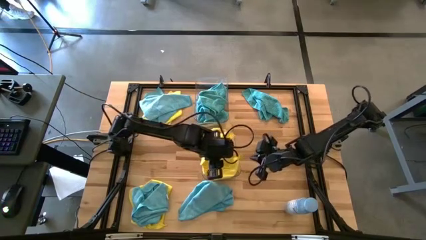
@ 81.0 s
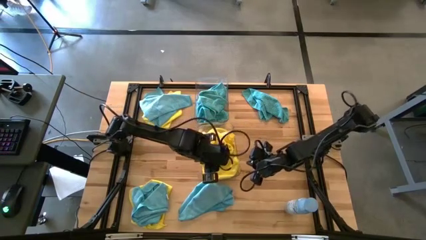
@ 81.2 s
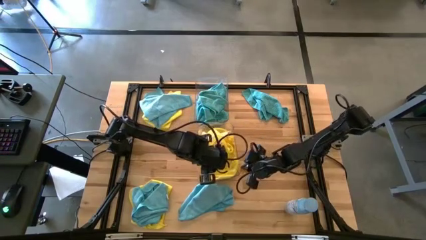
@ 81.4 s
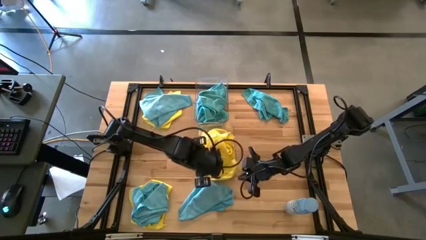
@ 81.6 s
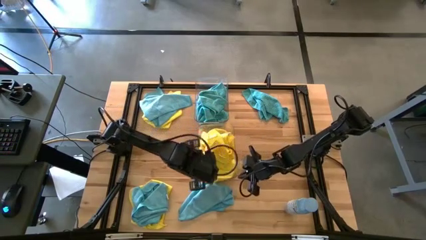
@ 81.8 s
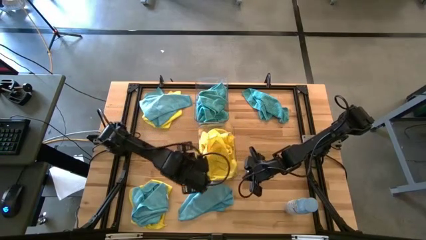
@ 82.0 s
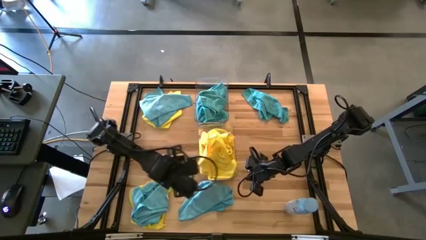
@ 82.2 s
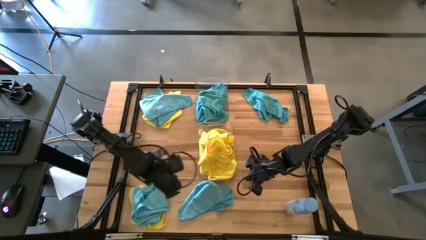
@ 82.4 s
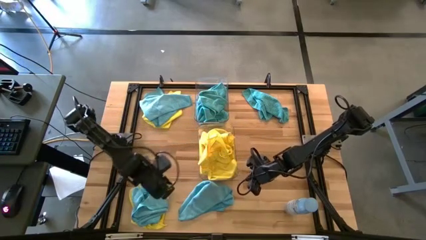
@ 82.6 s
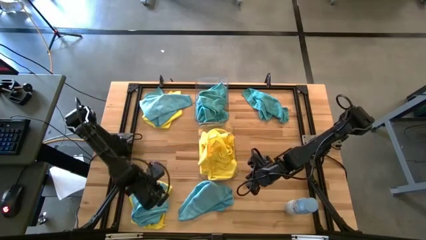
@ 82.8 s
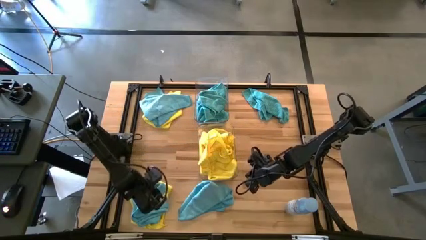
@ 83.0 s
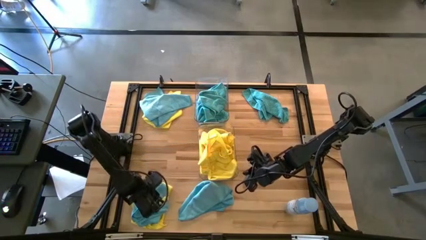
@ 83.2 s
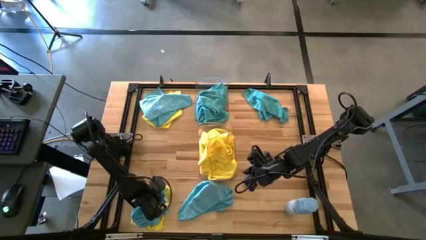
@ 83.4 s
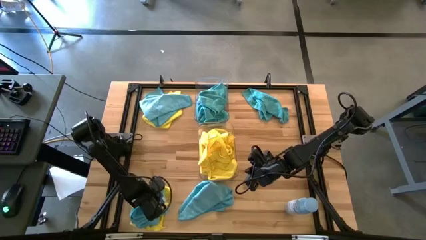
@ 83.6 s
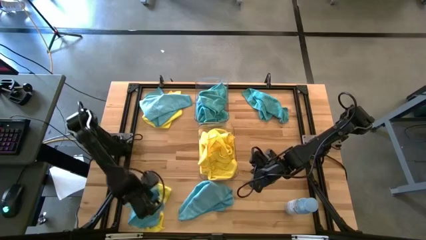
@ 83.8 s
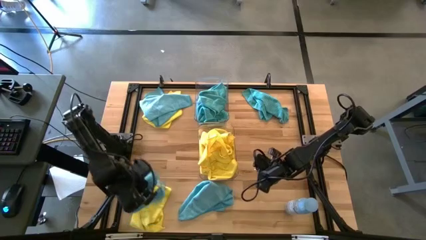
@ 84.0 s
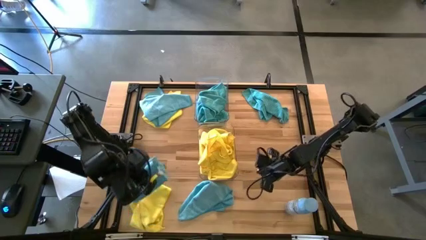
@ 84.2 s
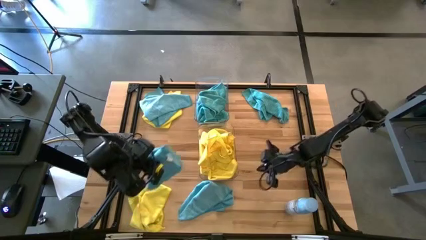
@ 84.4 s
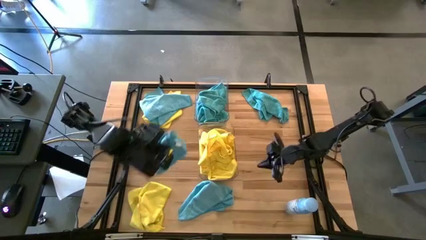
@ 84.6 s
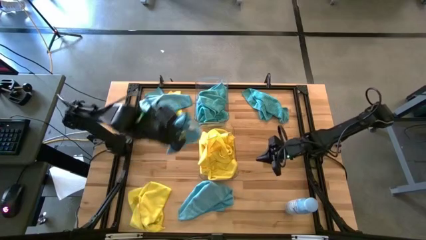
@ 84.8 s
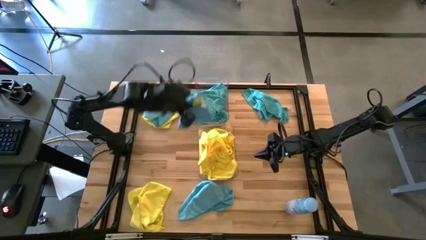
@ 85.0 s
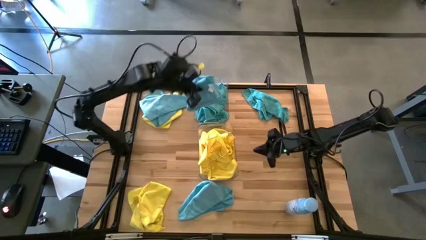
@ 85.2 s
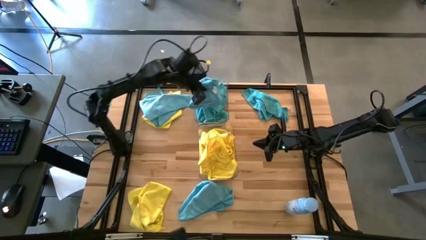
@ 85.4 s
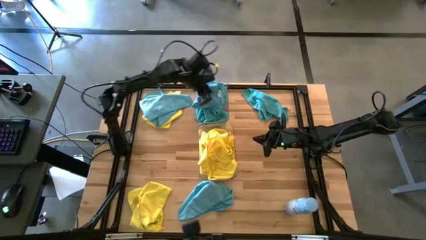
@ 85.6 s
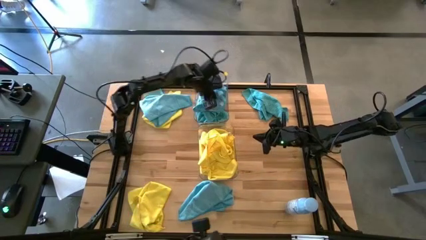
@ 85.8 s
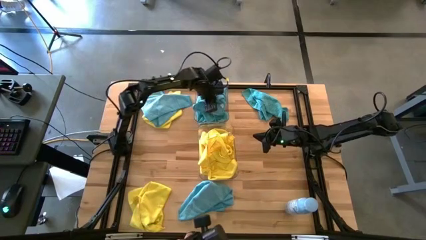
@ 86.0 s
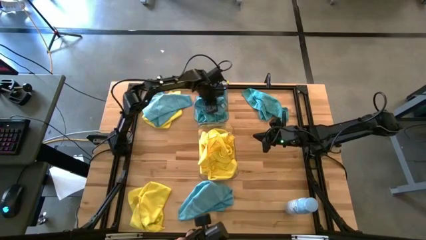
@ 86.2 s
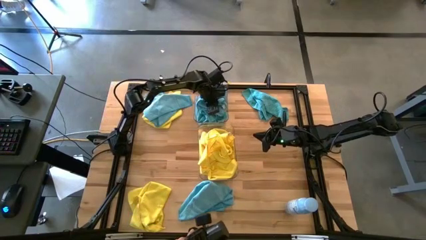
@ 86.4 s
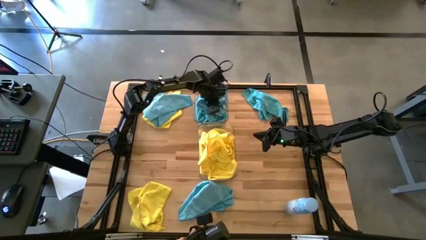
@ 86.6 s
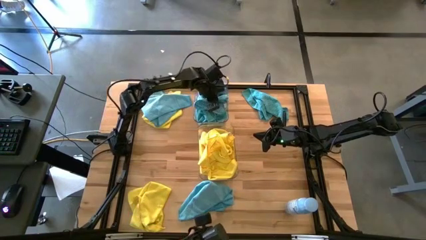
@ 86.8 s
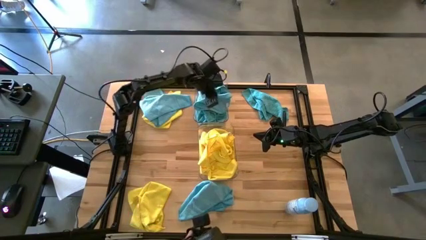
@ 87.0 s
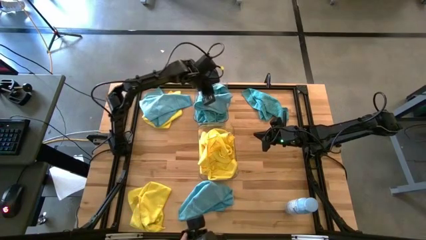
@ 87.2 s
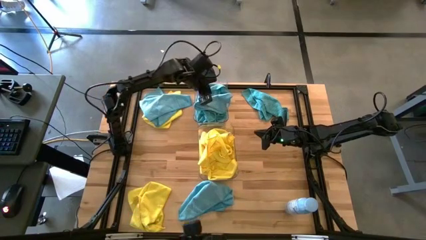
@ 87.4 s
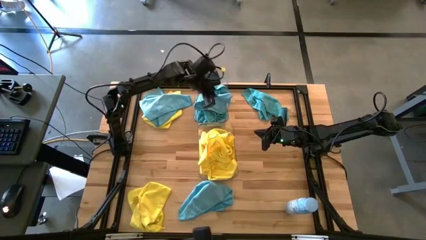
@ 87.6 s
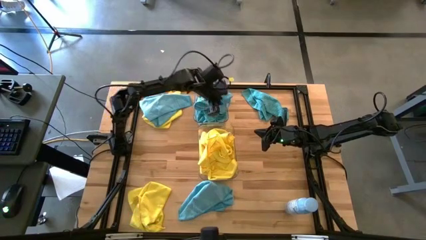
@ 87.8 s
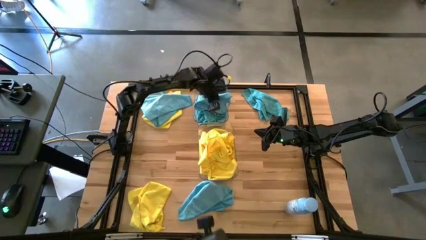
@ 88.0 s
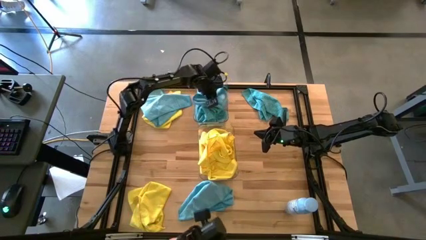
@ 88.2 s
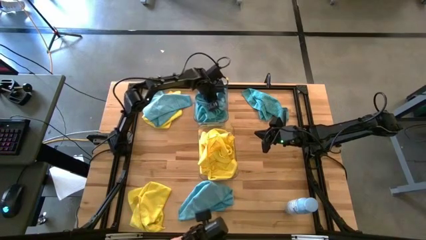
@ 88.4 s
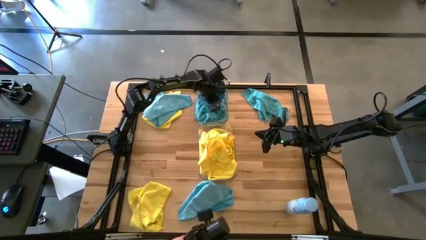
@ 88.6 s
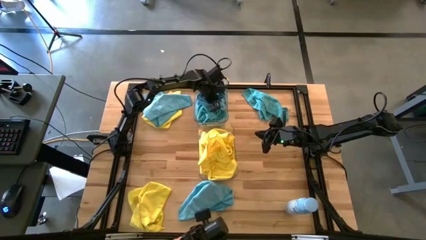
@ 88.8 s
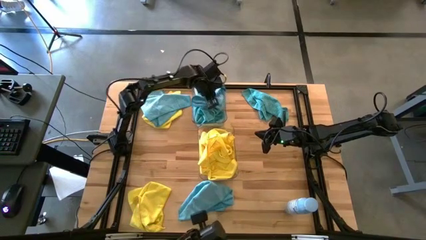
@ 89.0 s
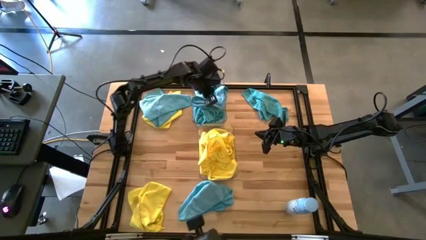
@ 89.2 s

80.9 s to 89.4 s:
Task: Sort microfiber towel by color & place in baskets
Put the blue towel into the top transparent bin

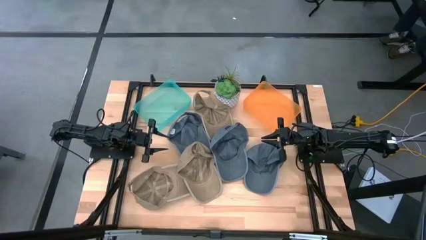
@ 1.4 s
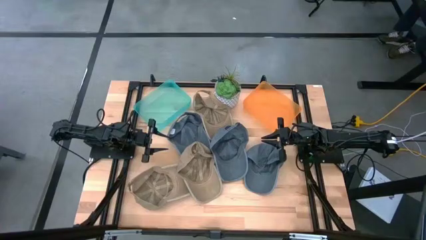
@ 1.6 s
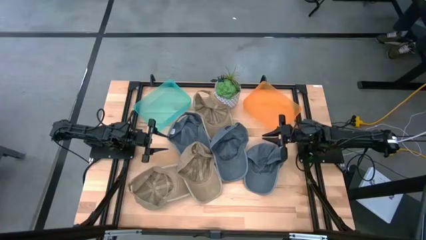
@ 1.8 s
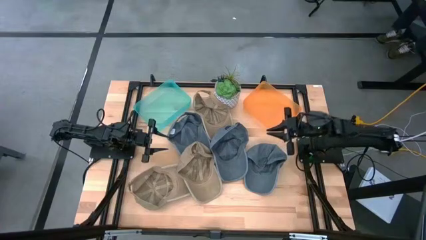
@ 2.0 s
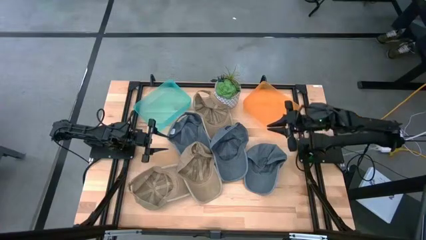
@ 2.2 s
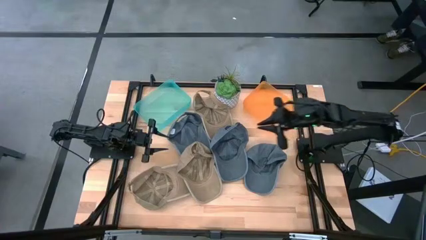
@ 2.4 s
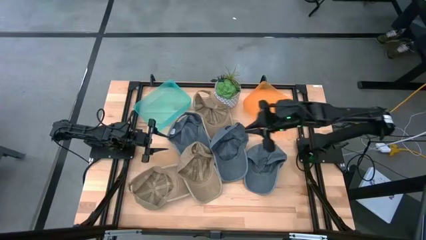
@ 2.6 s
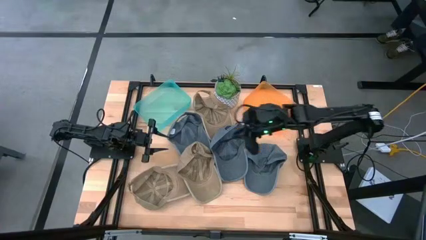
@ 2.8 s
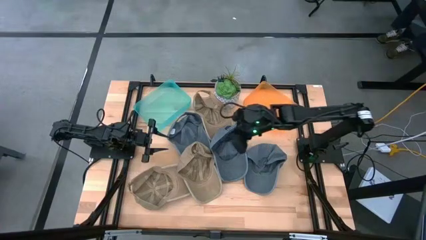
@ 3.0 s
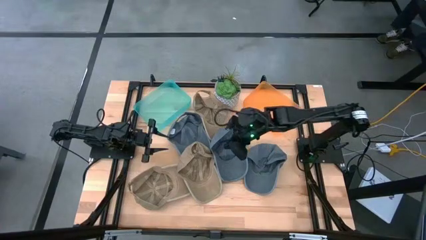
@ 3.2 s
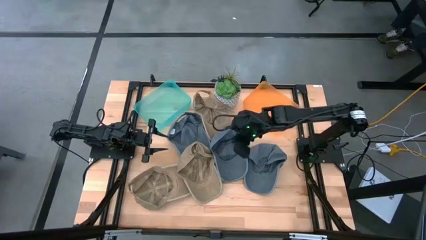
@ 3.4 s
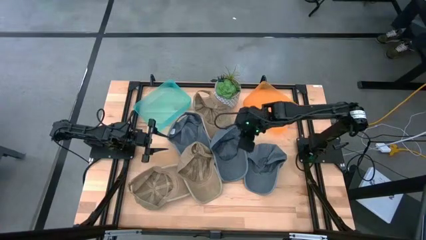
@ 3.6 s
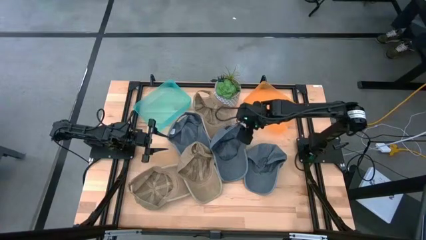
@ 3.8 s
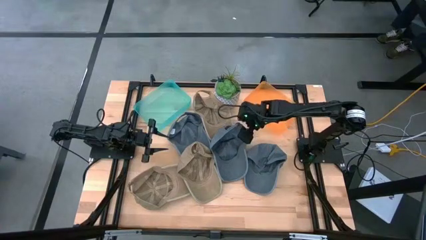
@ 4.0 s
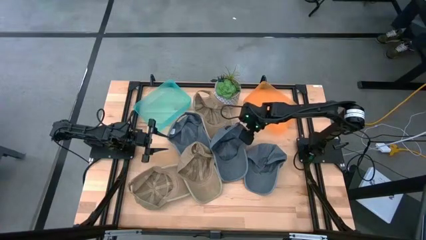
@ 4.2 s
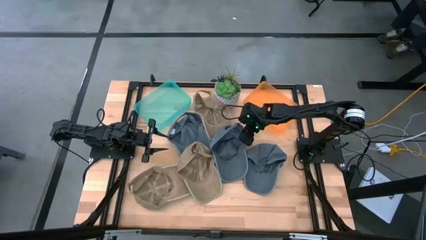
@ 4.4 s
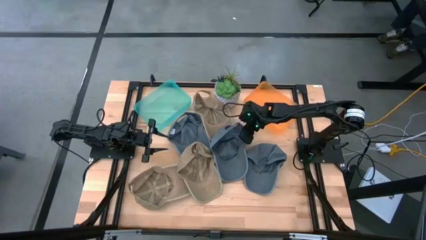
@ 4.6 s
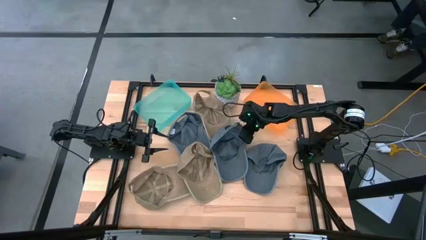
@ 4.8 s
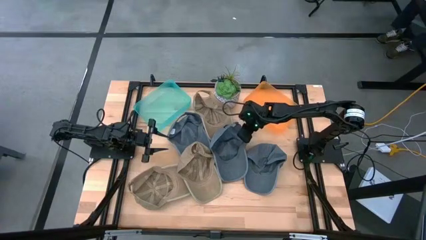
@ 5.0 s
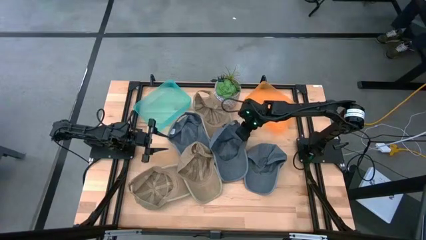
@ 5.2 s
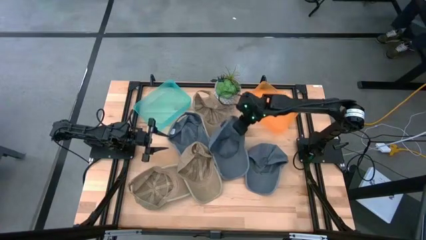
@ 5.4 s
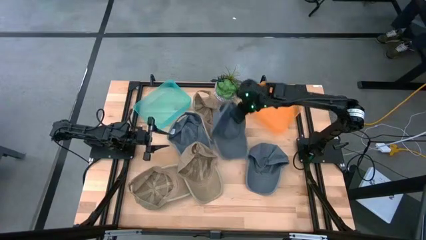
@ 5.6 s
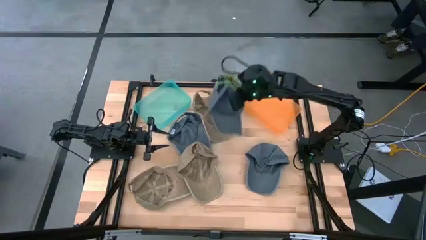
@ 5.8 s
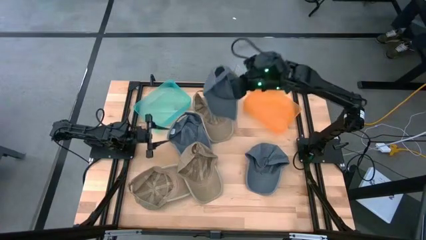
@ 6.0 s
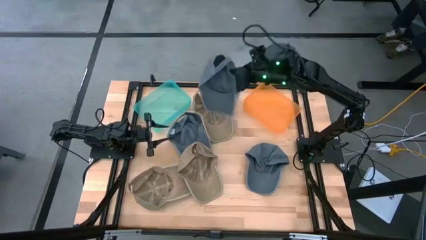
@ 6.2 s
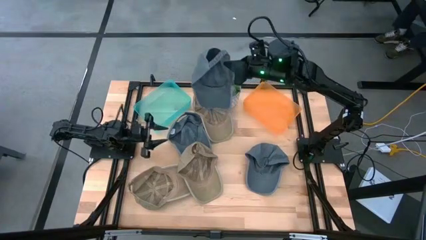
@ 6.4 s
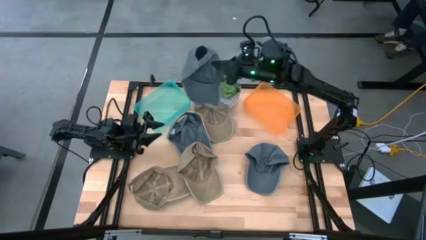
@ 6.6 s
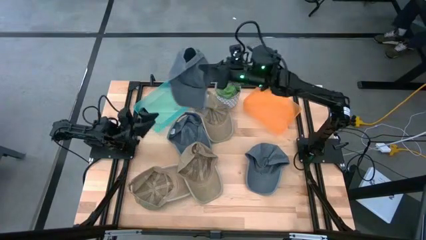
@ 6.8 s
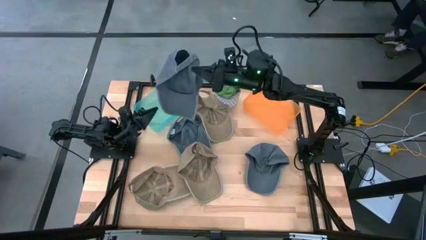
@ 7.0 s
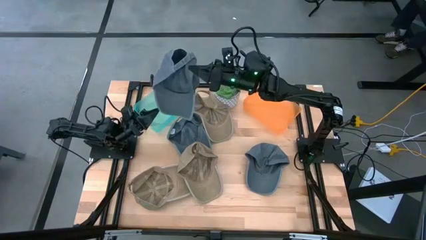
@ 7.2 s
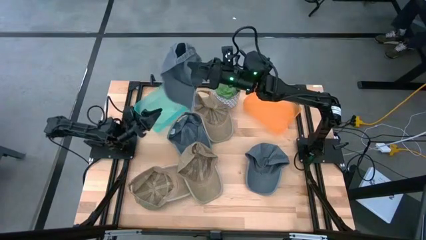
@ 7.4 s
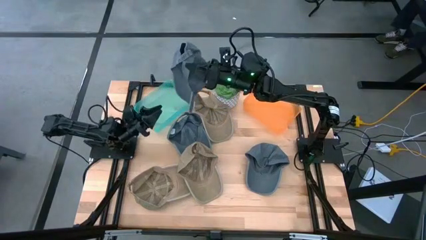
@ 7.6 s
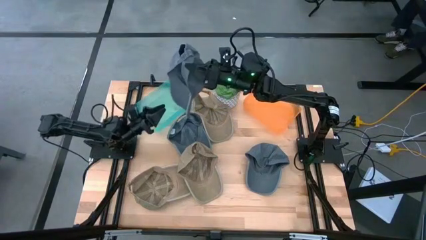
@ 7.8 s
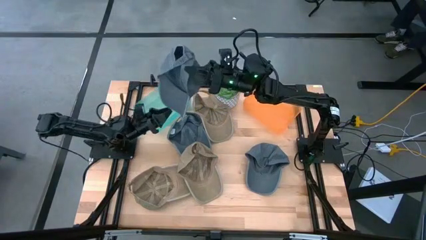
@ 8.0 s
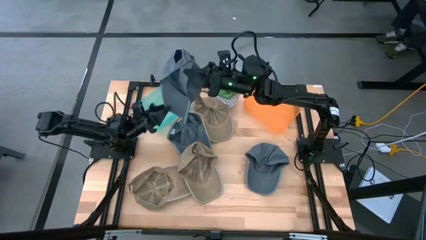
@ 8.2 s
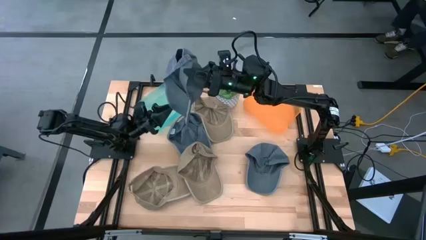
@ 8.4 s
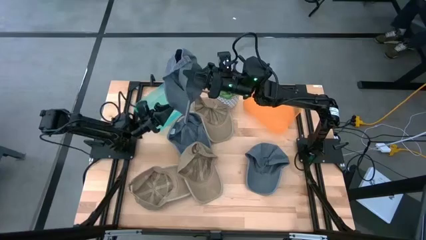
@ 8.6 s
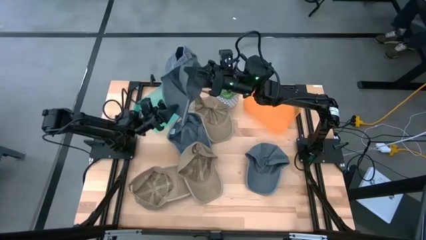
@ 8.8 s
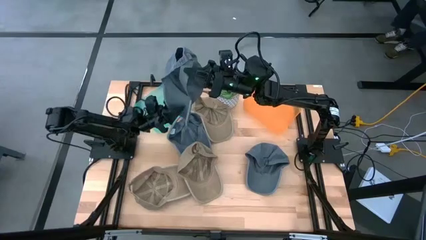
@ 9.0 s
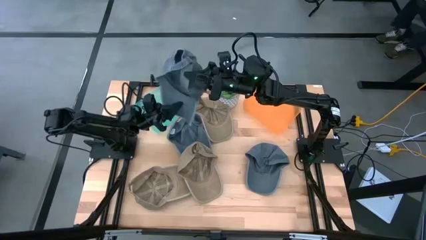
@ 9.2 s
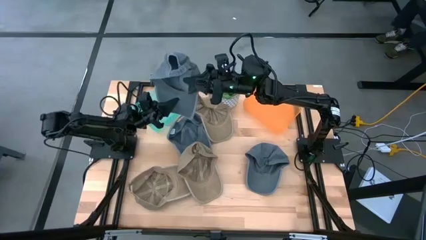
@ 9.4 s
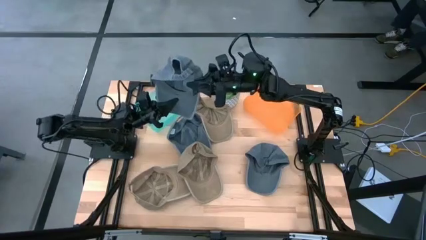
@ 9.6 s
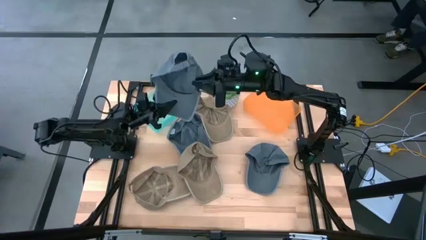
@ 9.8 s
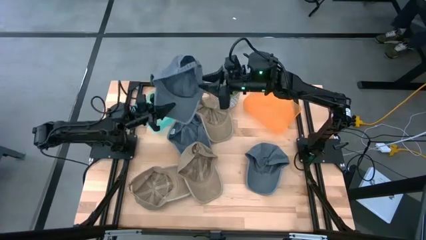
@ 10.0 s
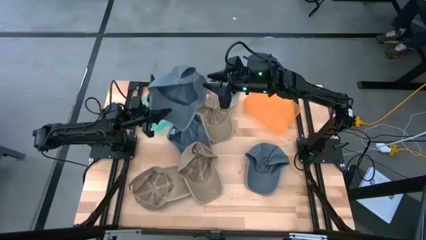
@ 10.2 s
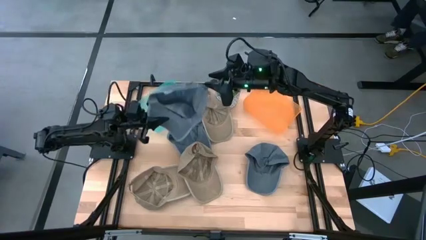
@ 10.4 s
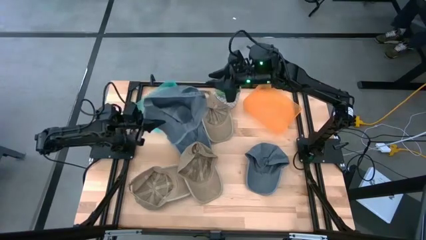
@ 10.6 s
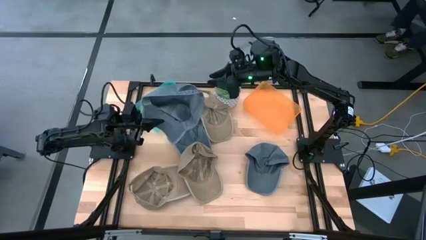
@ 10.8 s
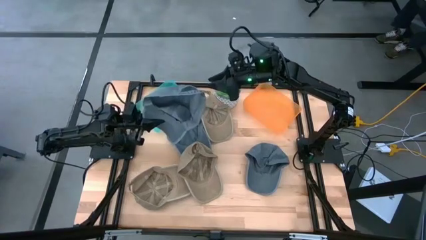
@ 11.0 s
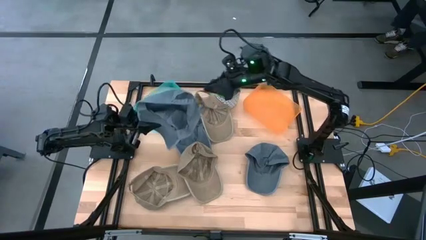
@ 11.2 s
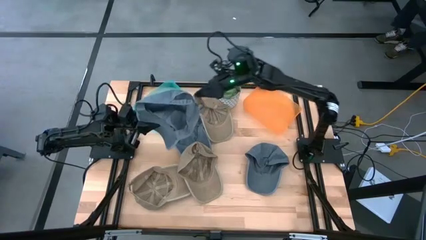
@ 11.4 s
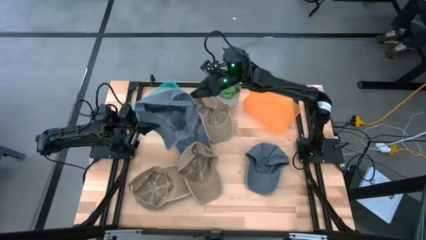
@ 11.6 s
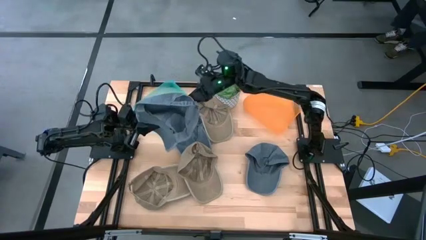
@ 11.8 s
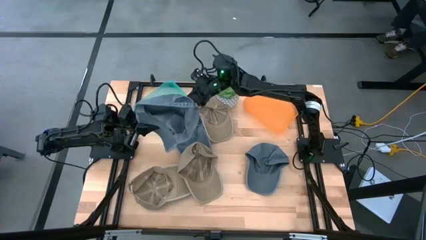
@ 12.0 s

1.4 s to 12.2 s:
Task: Pick & Place hat
Put the middle blue cap into the orange bin
